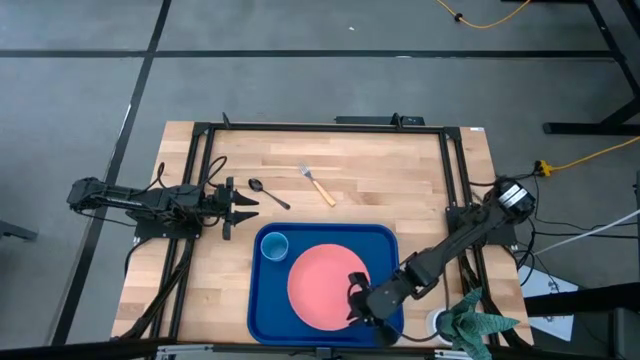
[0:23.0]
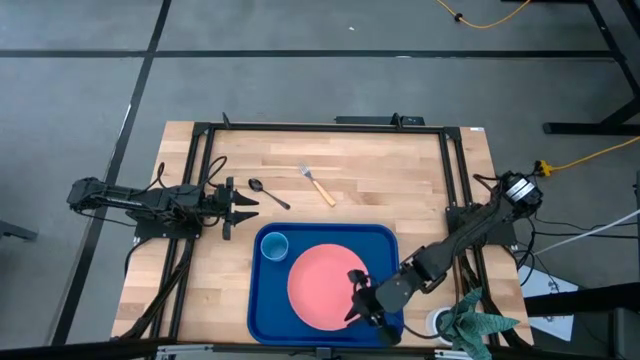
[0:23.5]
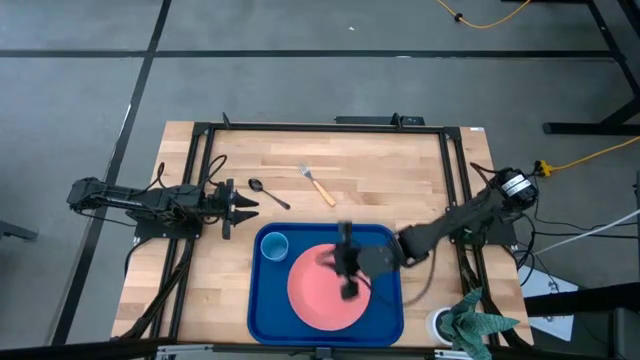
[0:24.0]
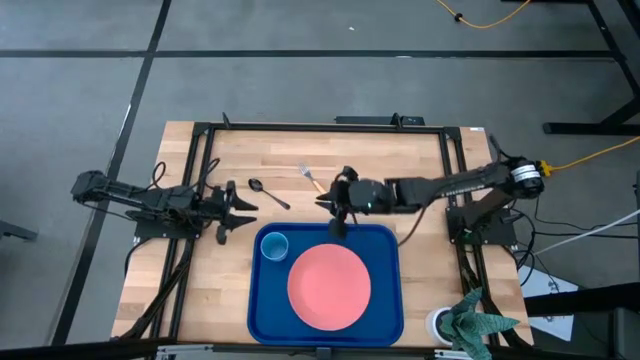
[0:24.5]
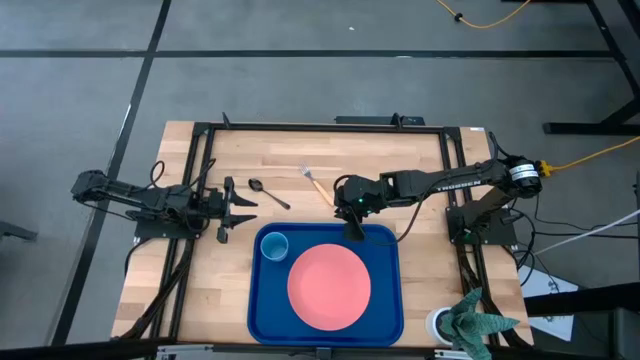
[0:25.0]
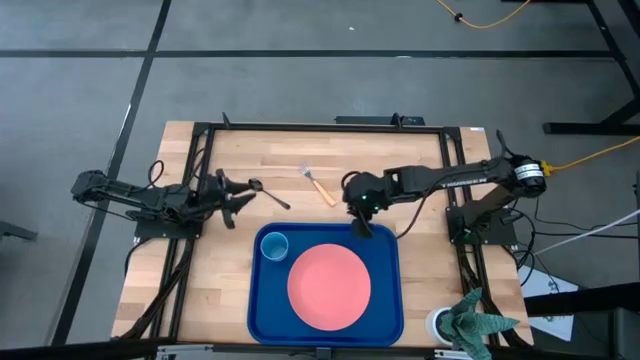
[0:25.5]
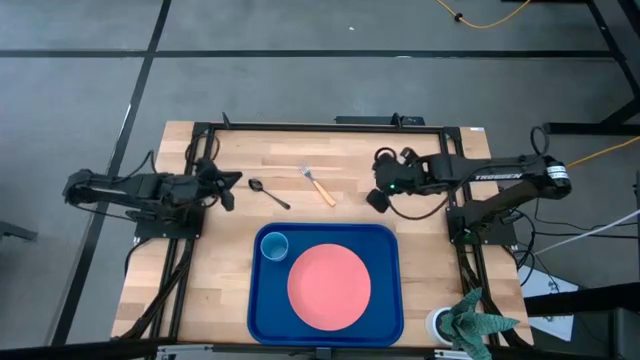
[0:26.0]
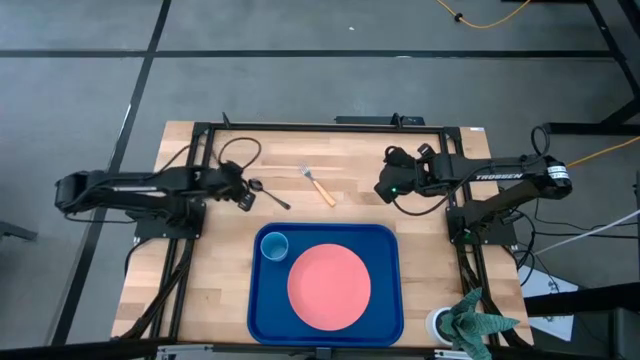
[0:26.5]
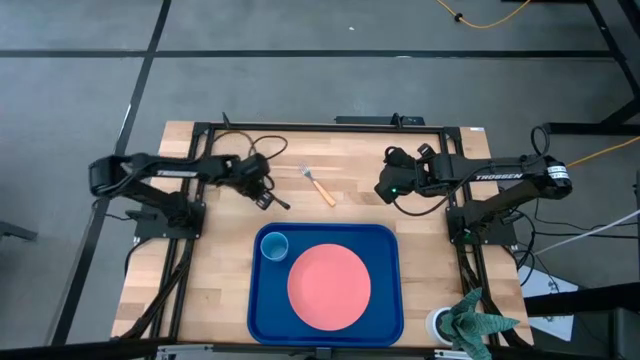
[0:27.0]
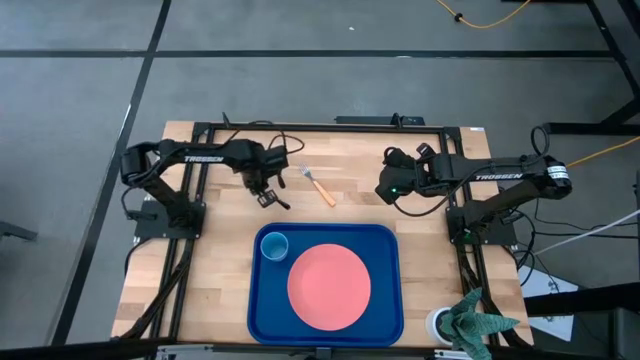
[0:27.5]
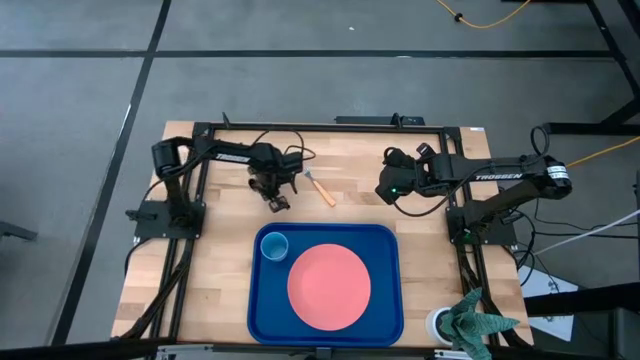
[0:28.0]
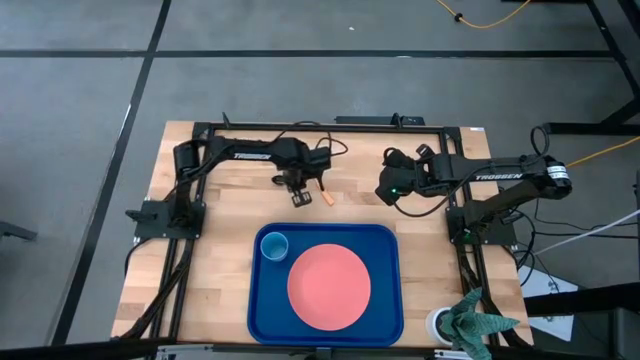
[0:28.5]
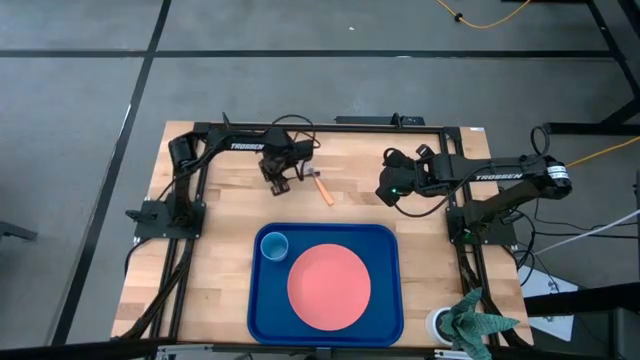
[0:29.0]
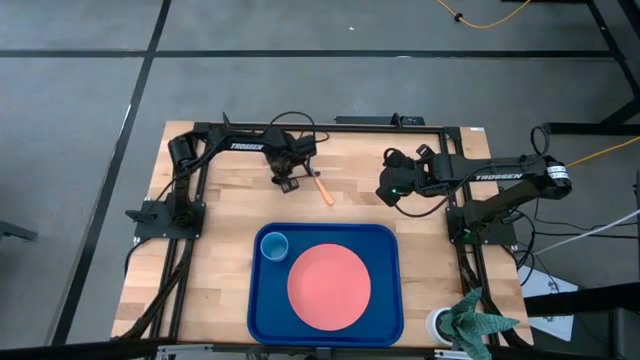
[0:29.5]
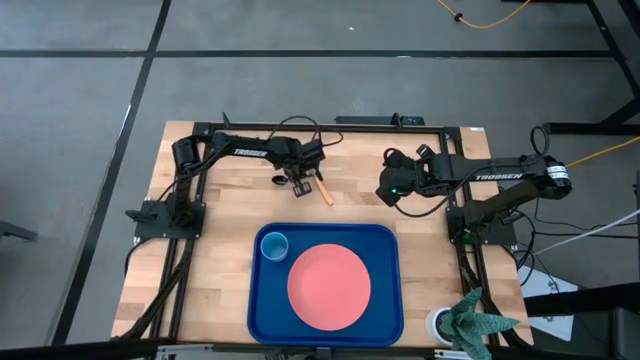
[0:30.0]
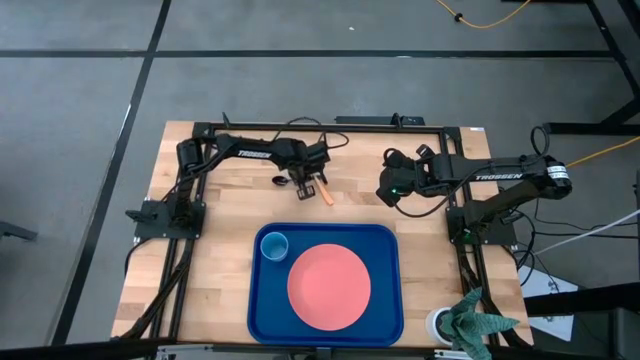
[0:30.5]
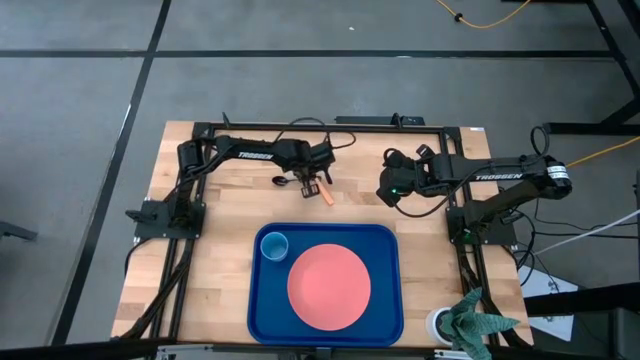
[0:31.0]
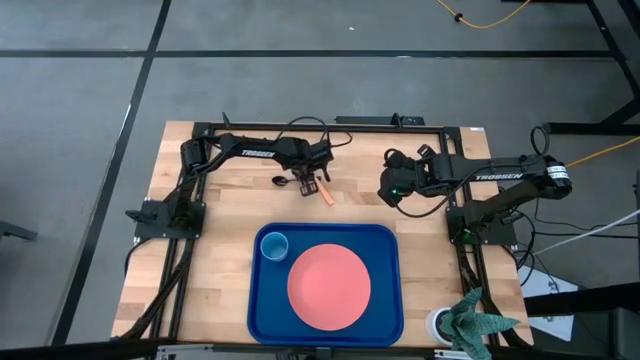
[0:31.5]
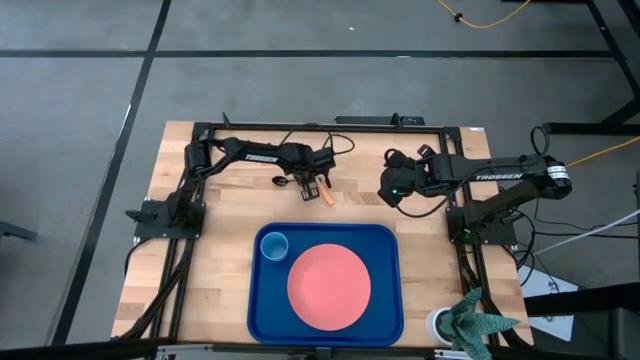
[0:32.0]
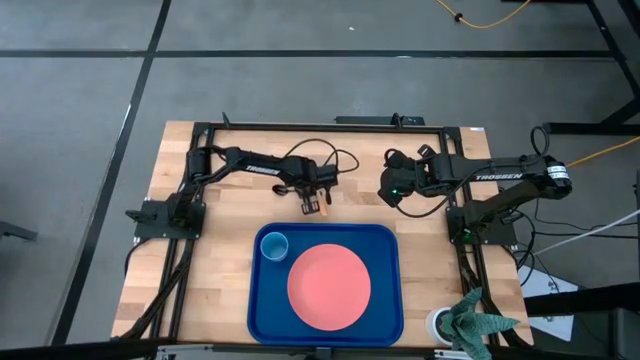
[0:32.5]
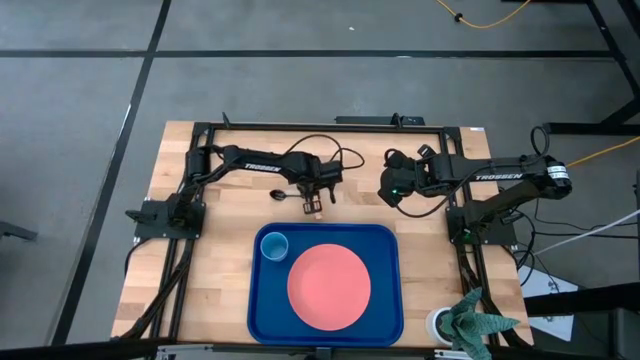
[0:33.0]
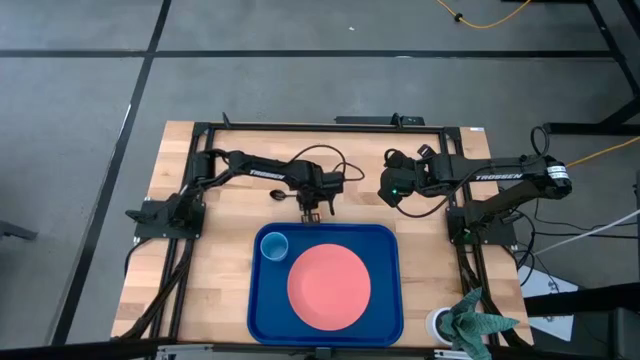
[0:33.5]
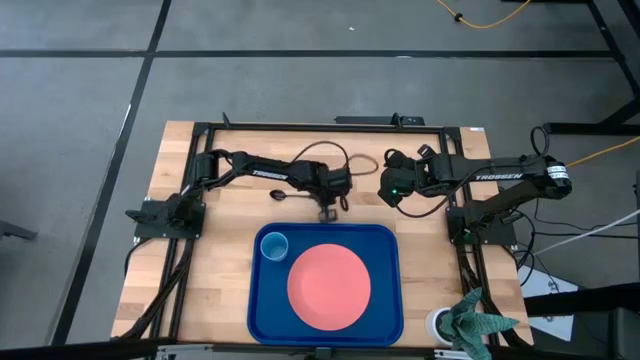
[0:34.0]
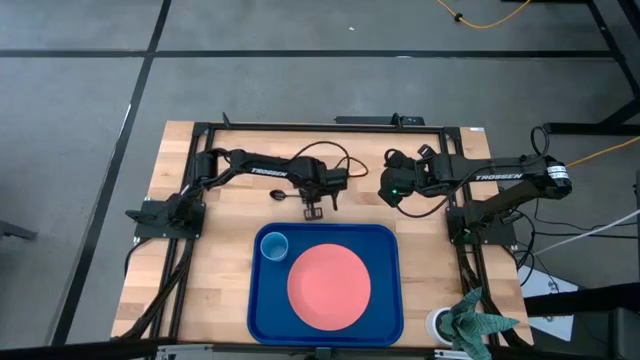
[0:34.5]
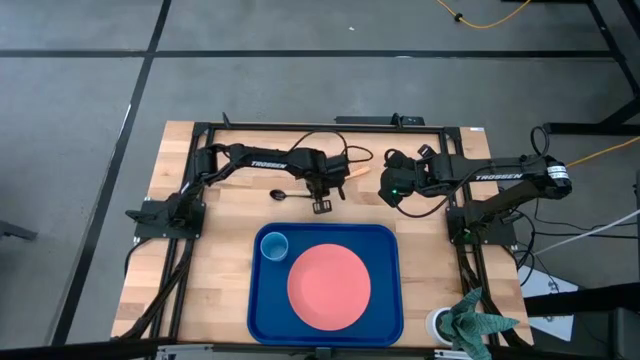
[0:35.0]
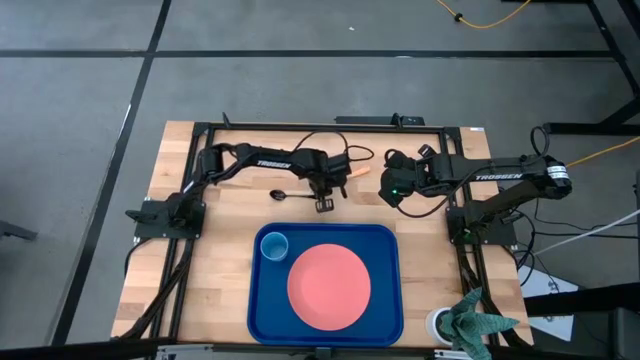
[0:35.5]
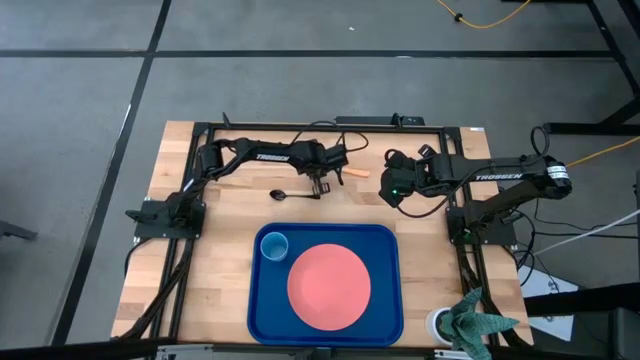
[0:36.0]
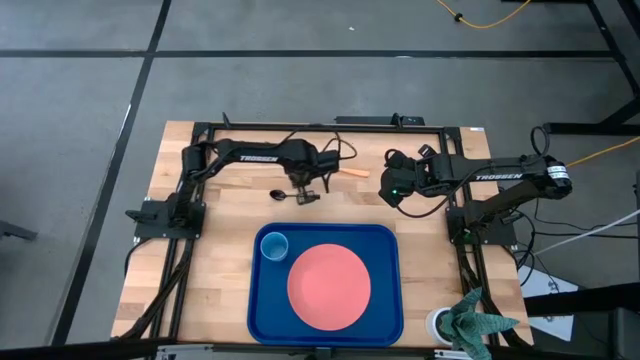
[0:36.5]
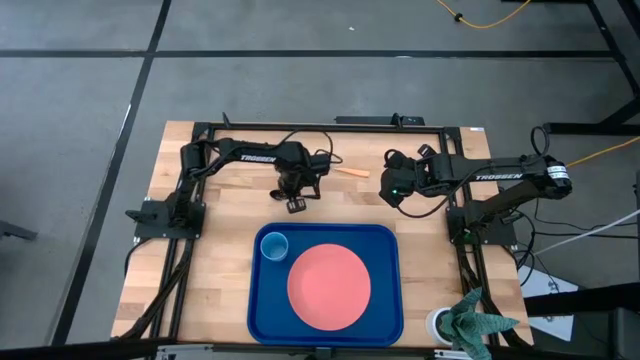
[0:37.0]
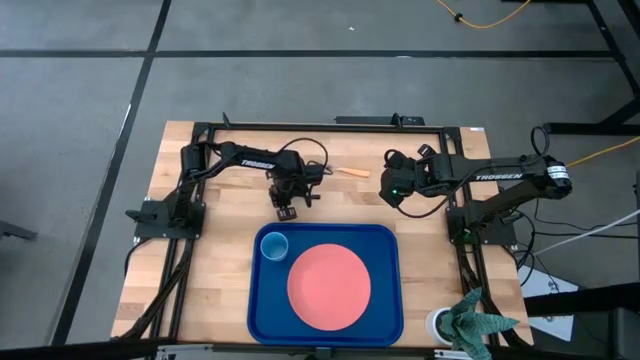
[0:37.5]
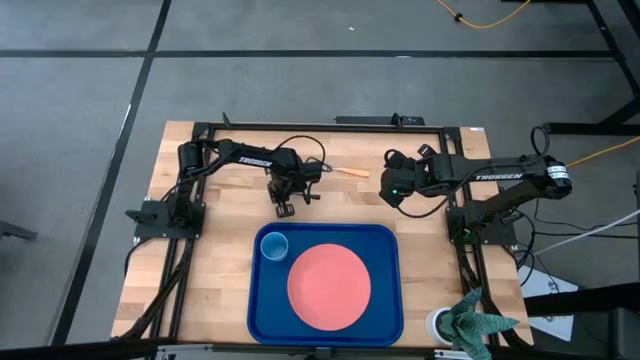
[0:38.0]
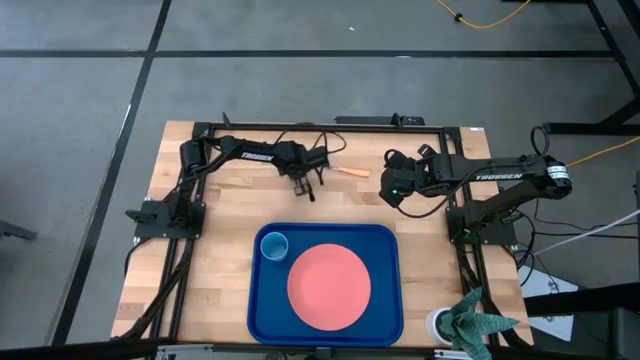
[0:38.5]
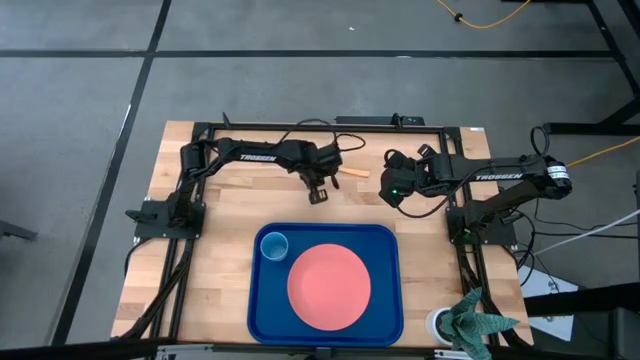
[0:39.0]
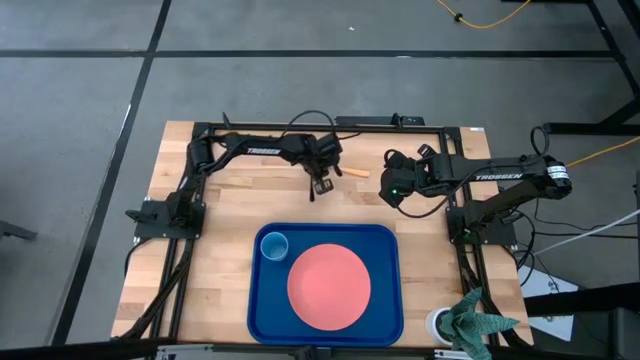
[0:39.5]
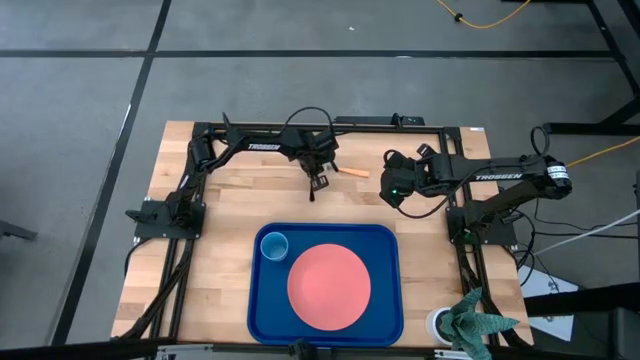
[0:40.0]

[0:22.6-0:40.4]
Task: Pick and place plate/cup/fork/spoon on tray
Adjust the black spoon and orange fork on the table

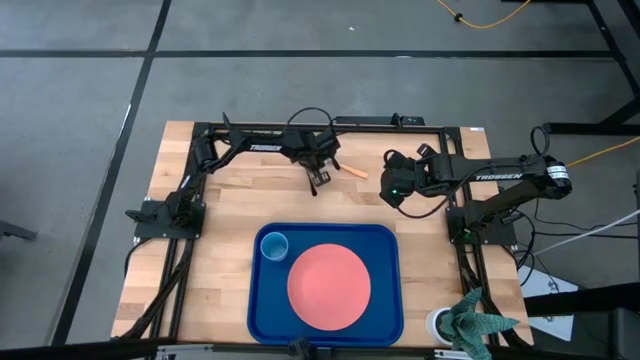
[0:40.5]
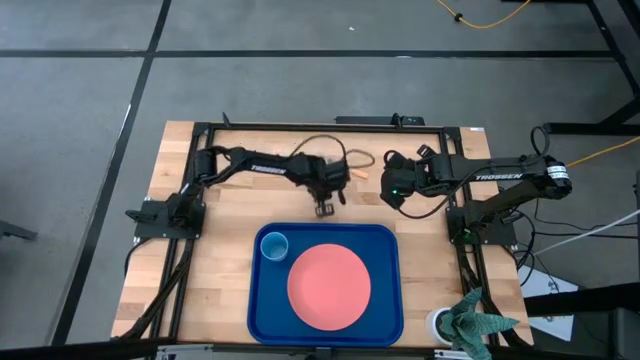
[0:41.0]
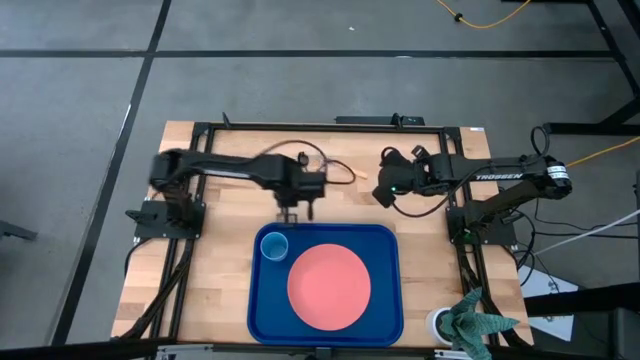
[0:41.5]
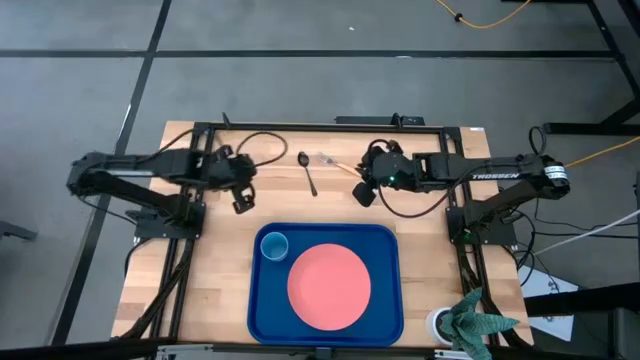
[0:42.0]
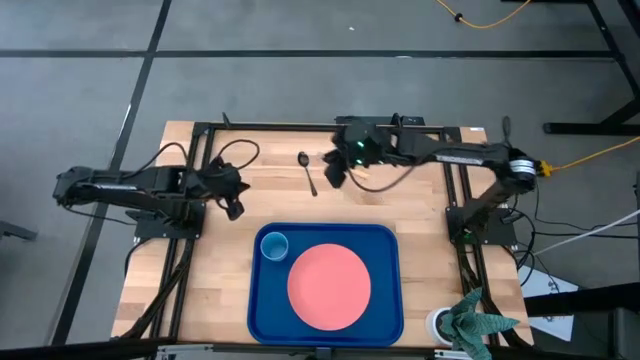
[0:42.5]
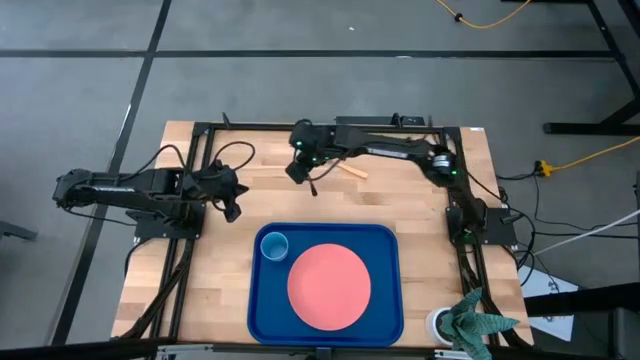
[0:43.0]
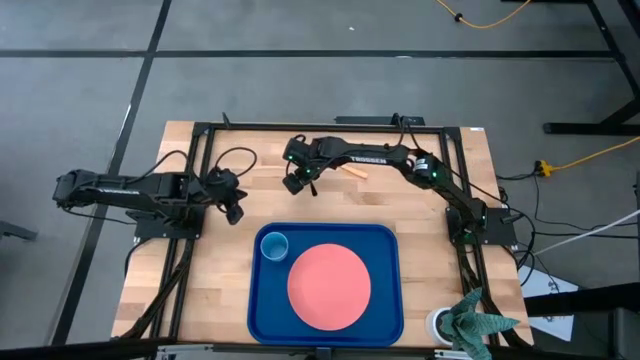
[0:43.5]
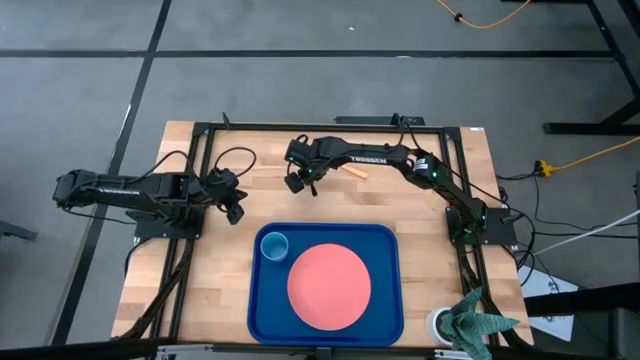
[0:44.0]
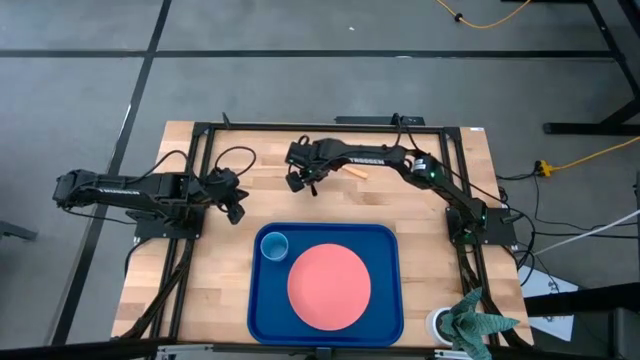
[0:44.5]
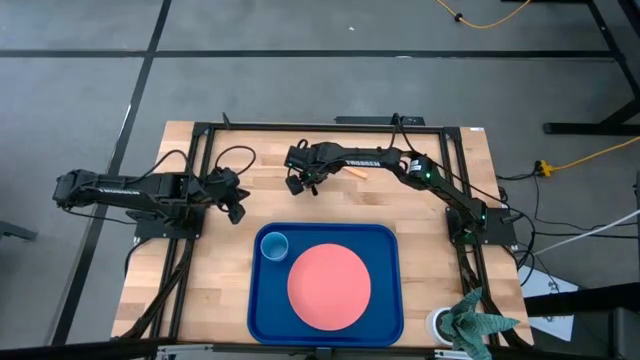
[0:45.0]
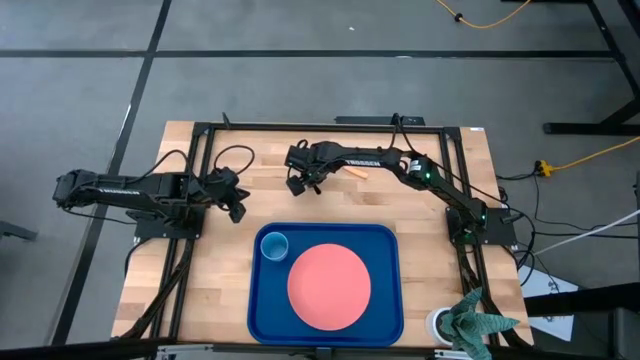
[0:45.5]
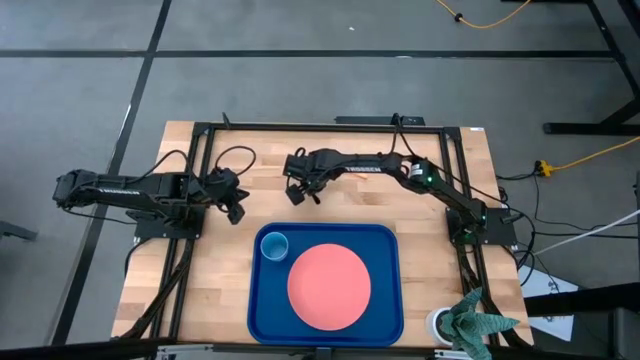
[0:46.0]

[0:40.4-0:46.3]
Put the black spoon on the blue tray to the right of the pink plate
